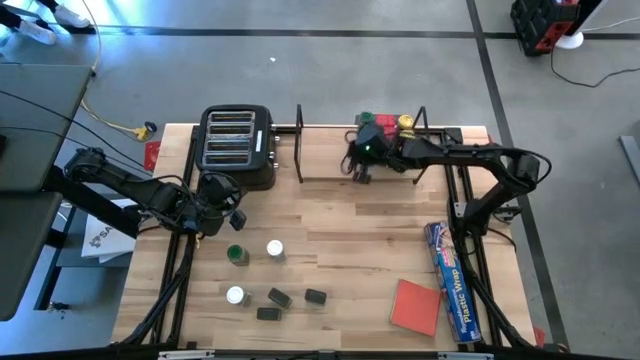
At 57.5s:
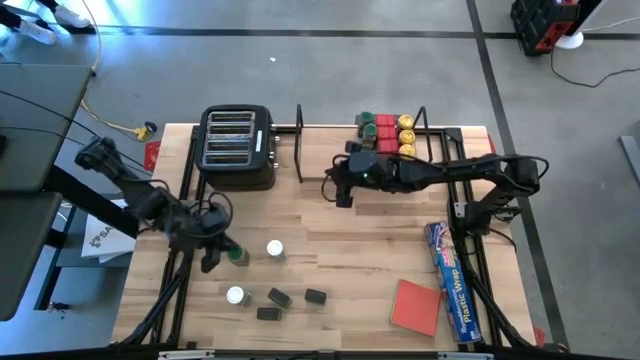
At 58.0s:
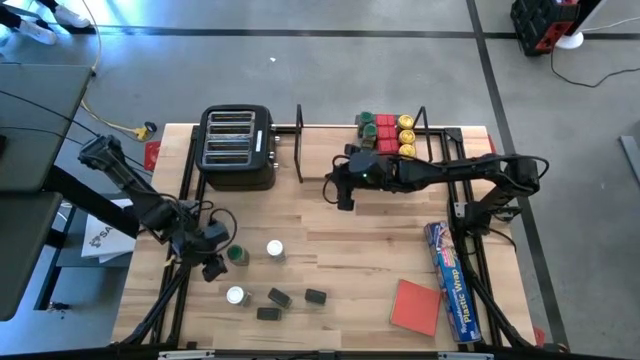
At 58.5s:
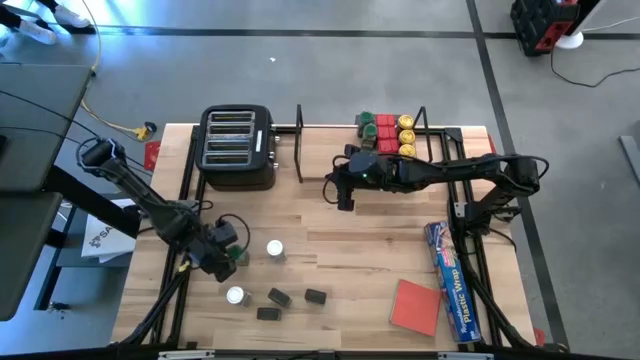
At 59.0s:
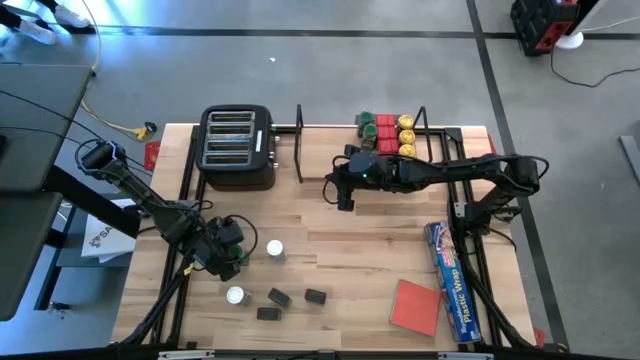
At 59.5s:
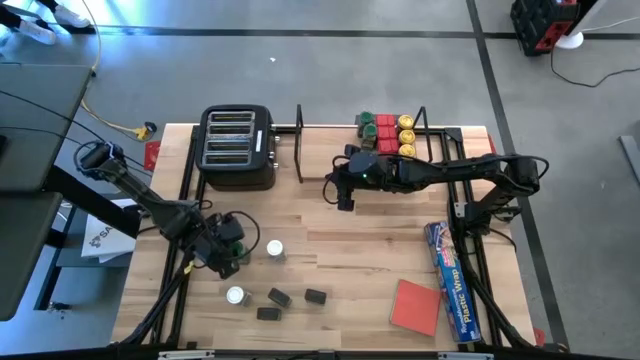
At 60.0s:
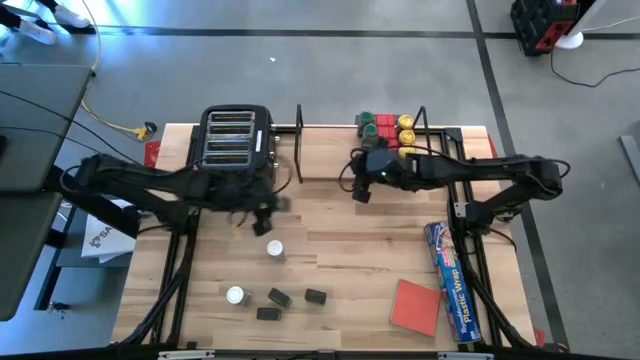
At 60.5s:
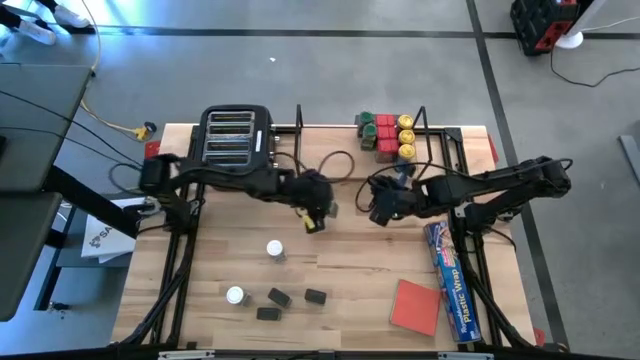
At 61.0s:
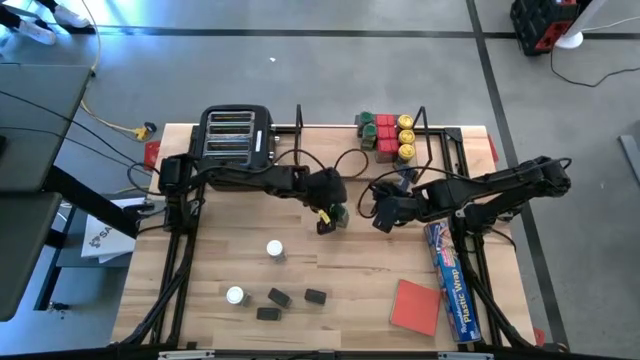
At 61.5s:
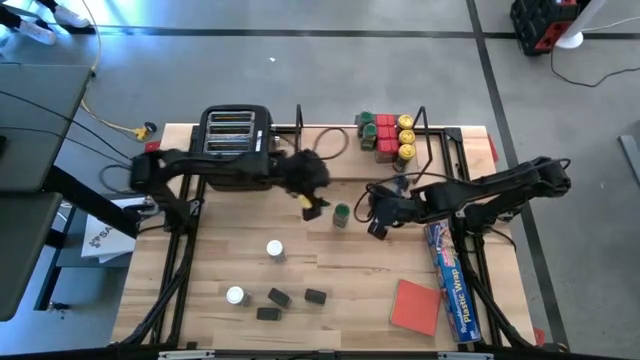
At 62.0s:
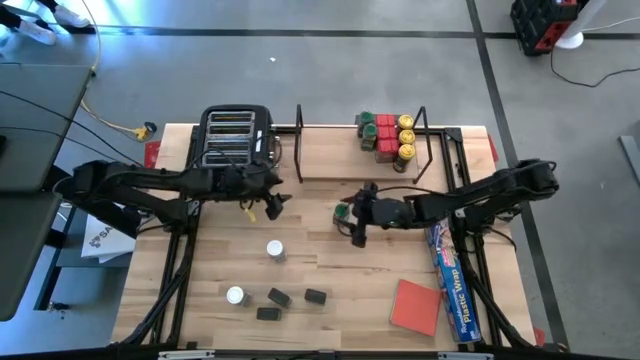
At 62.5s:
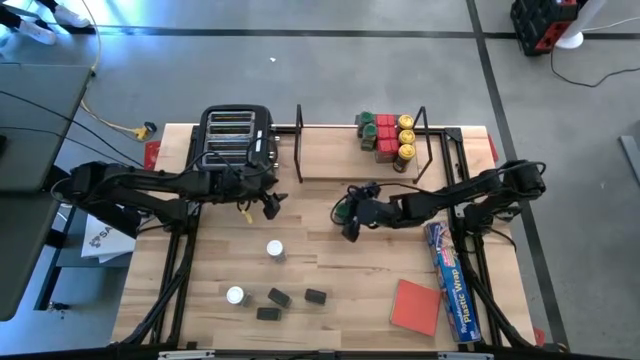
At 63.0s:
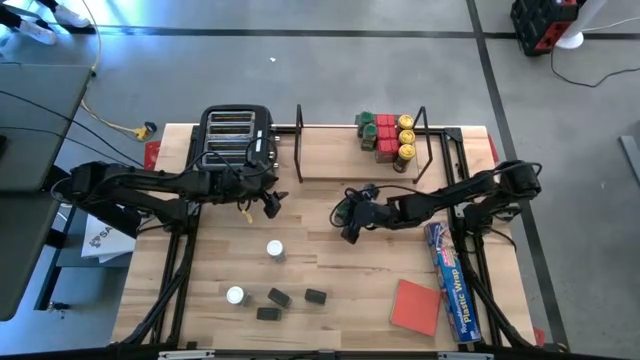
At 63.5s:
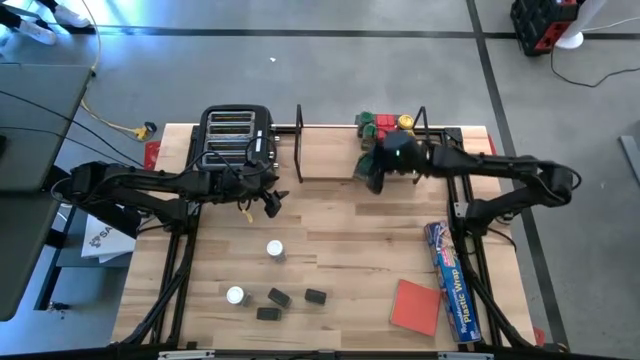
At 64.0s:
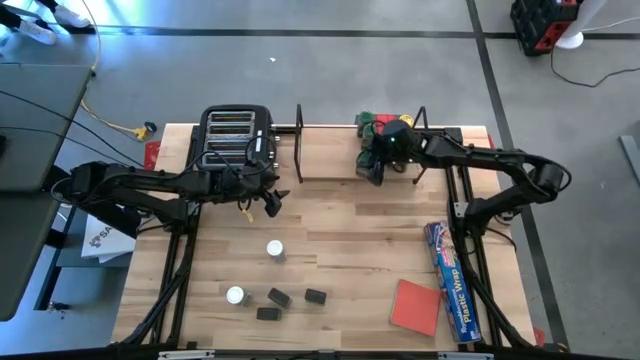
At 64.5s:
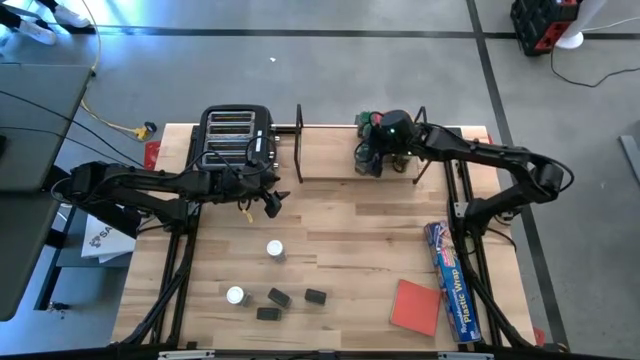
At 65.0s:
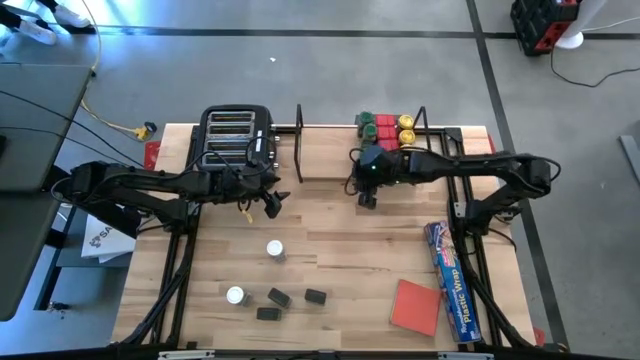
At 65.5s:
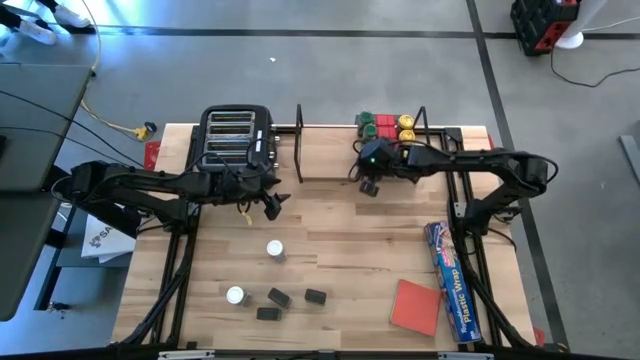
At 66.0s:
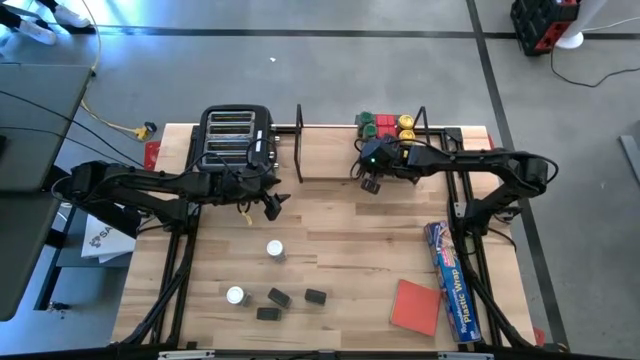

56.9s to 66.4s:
Task: Shelf spices
Put the green seasoning bottle on the shelf aligned with the other green seasoning bottles

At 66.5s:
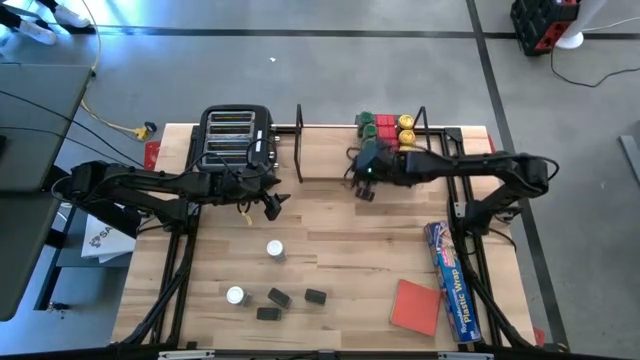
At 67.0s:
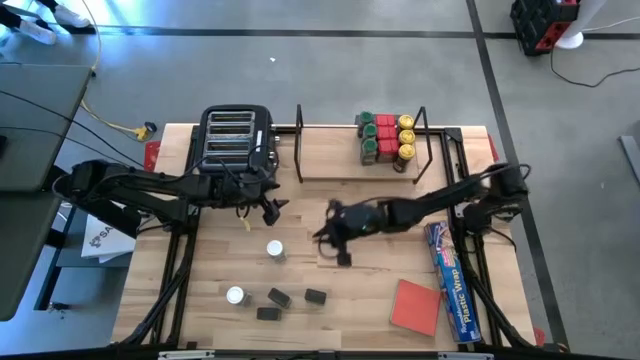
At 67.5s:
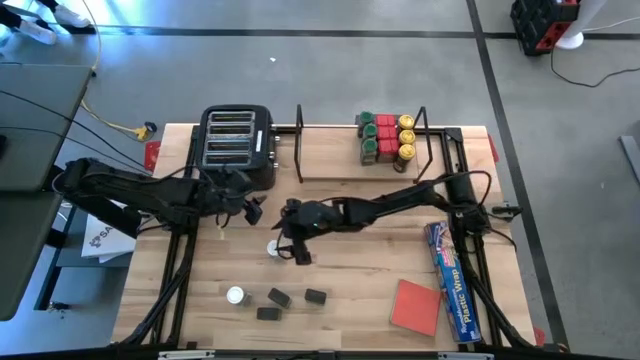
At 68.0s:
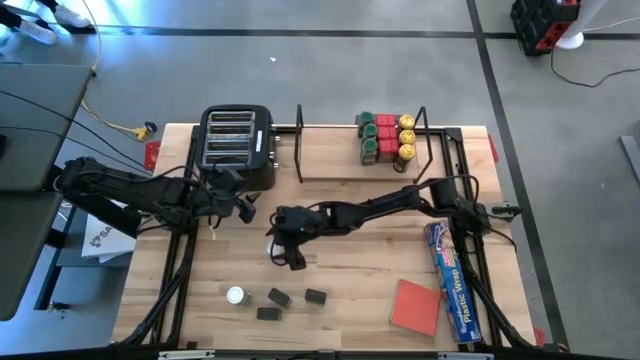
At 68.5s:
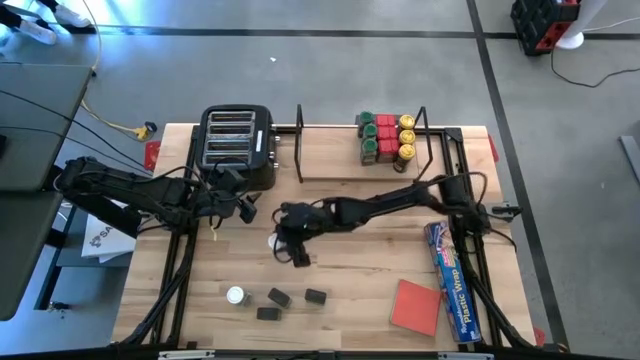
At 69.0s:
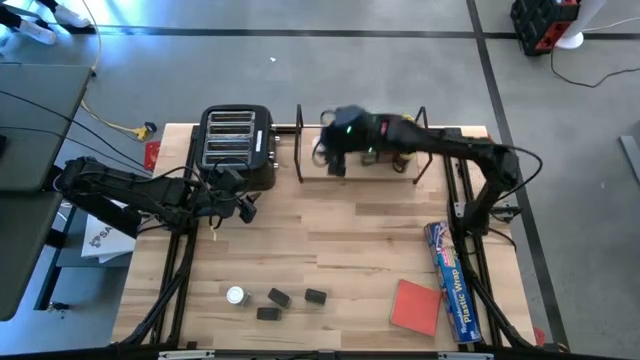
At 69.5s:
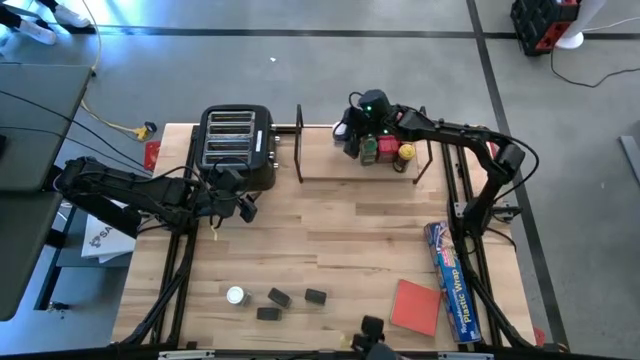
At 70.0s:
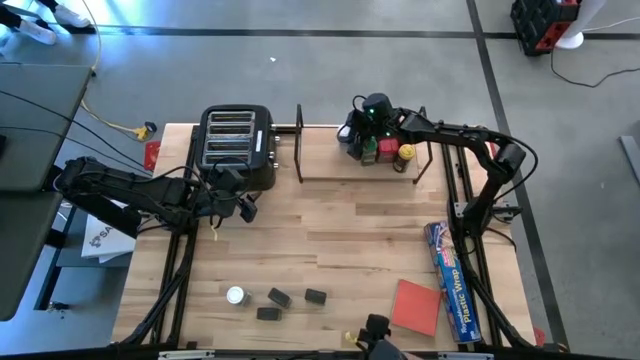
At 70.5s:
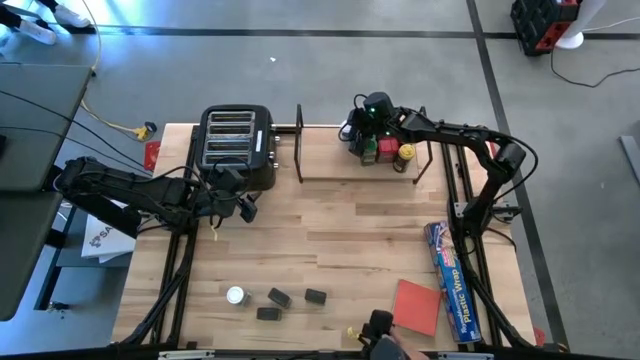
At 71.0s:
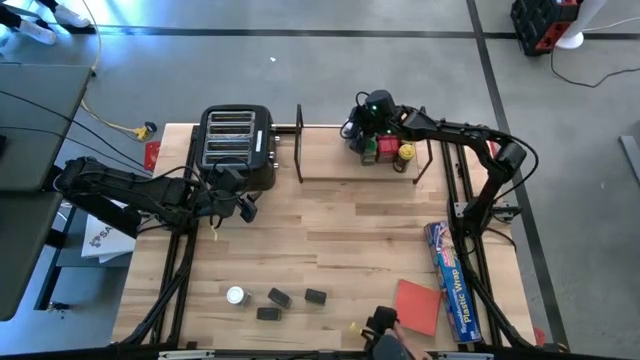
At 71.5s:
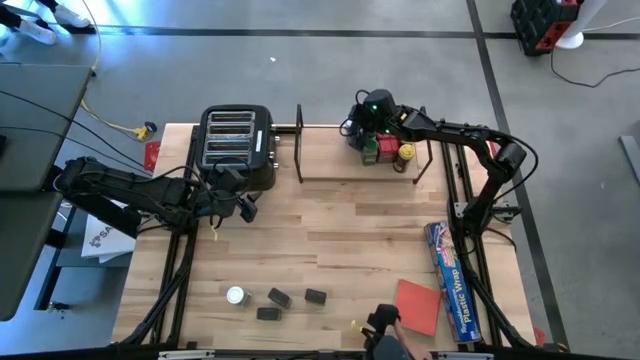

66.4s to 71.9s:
Put the top white seasoning bottle on the shelf

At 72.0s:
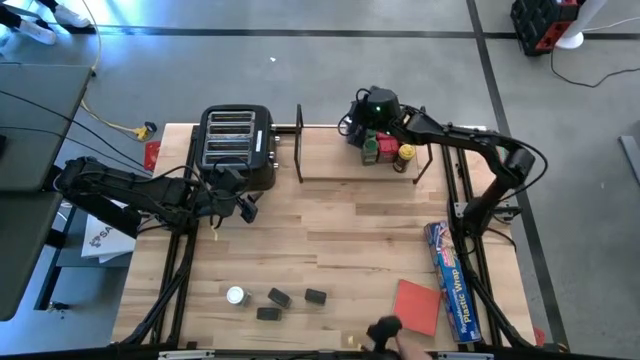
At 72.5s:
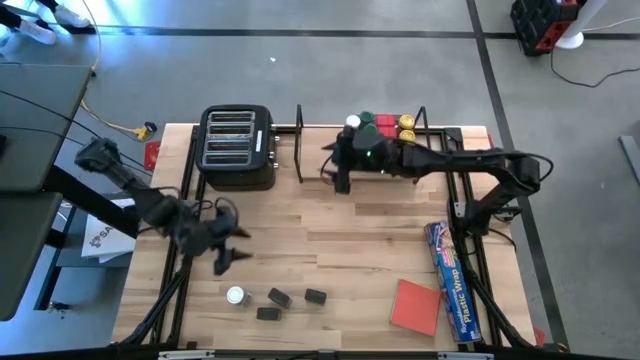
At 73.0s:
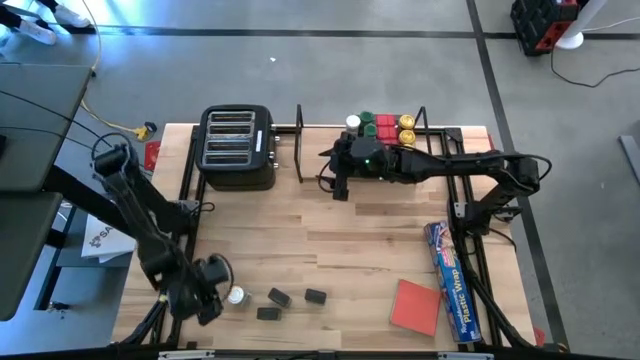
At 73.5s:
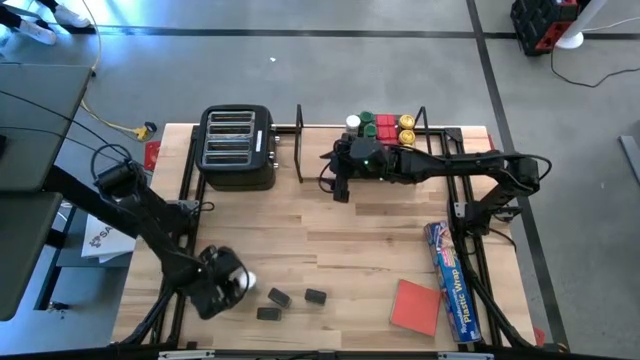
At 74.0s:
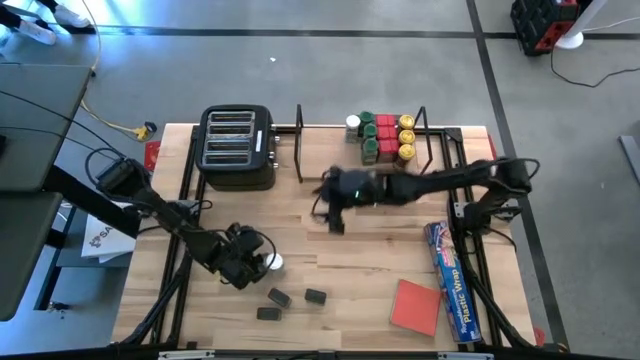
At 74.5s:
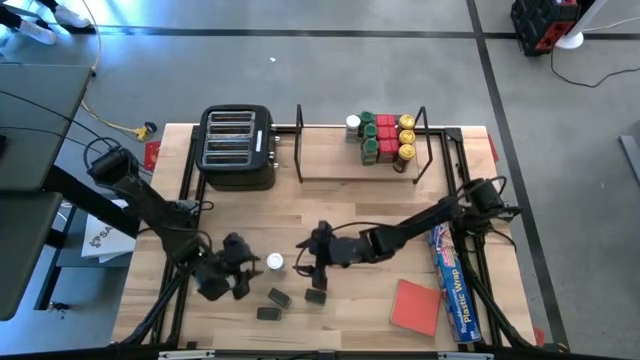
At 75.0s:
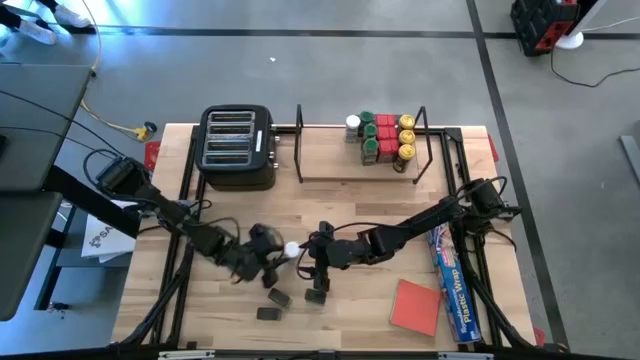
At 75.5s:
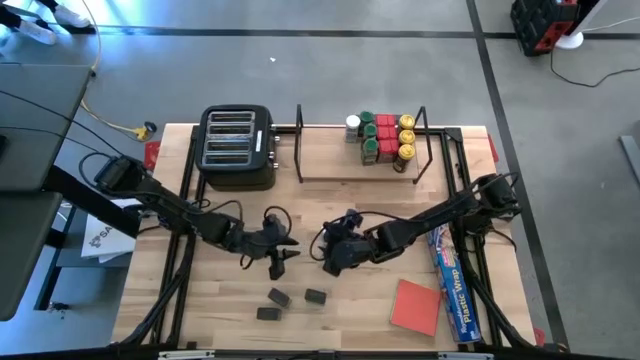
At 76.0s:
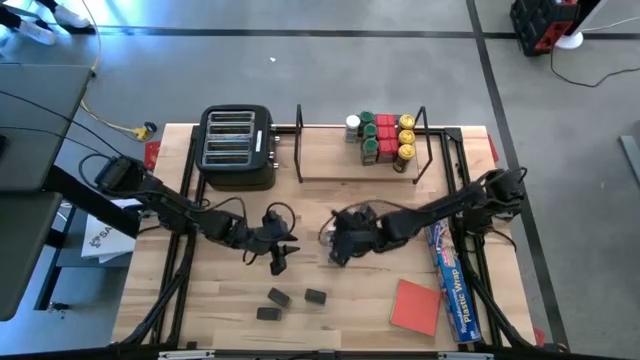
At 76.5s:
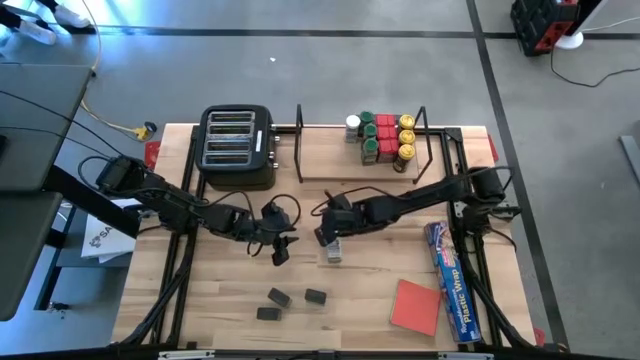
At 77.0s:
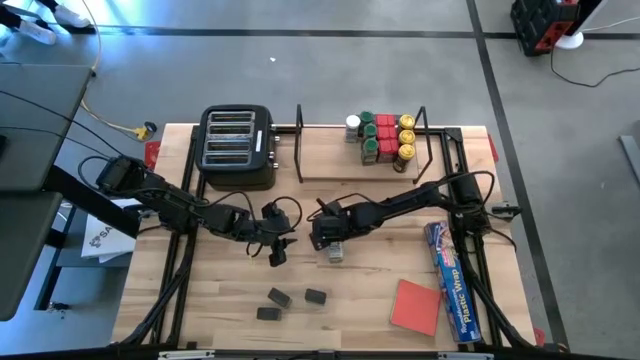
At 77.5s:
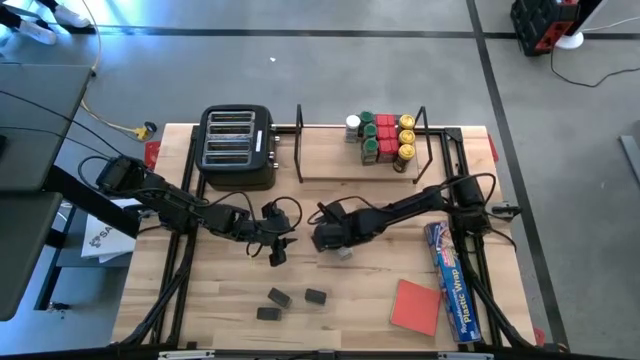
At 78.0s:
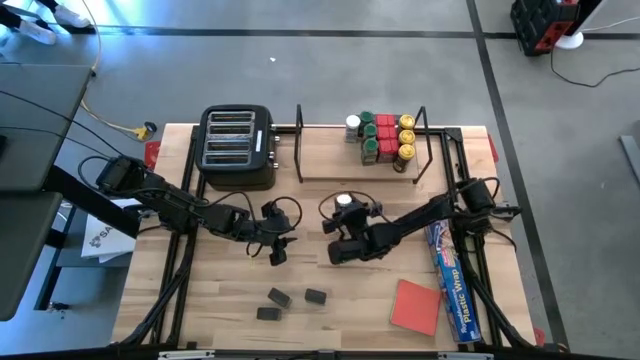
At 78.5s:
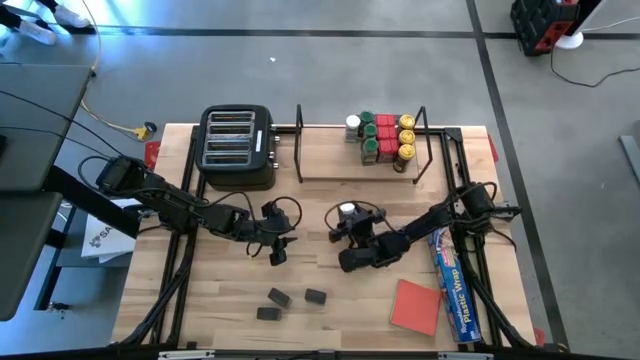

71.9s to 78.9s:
Put the white seasoning bottle on the shelf aligned with the other white seasoning bottle

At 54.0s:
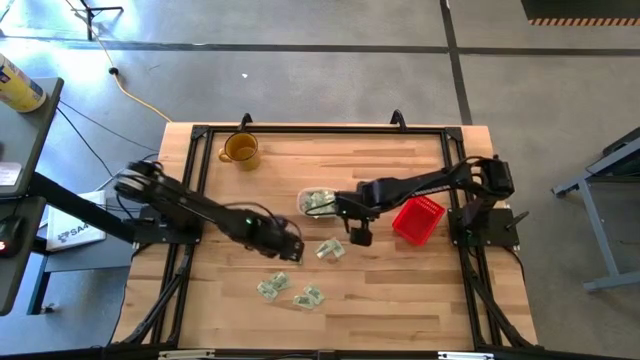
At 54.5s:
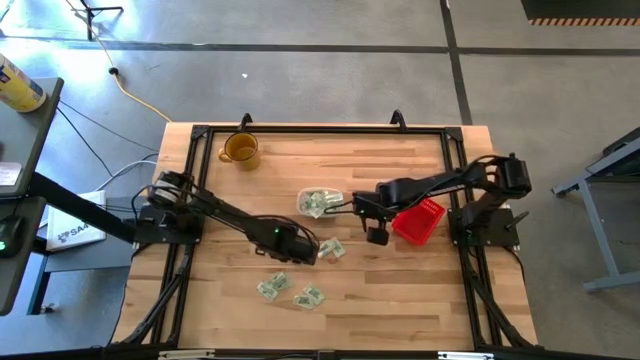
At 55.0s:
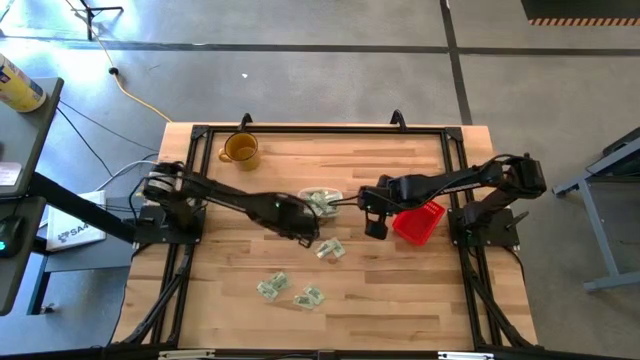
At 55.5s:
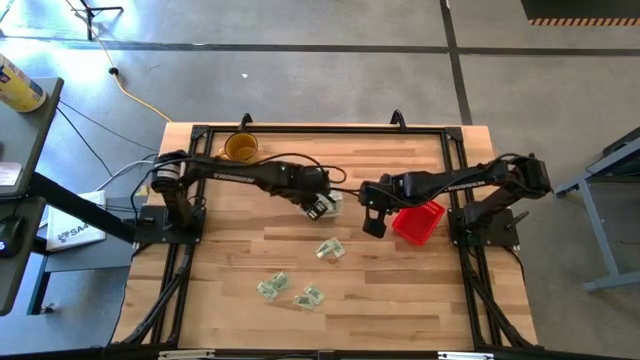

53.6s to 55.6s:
Task: Pick and place items into bin
Put the green stevia packet into the transparent bin
